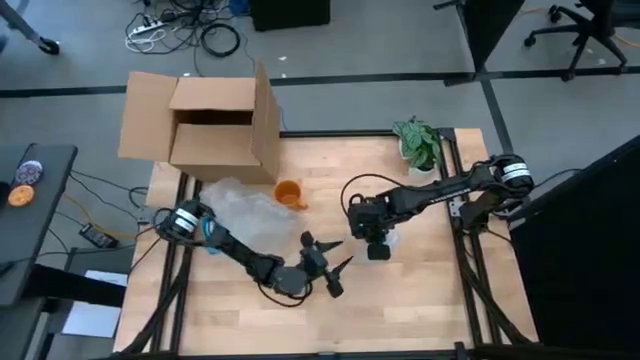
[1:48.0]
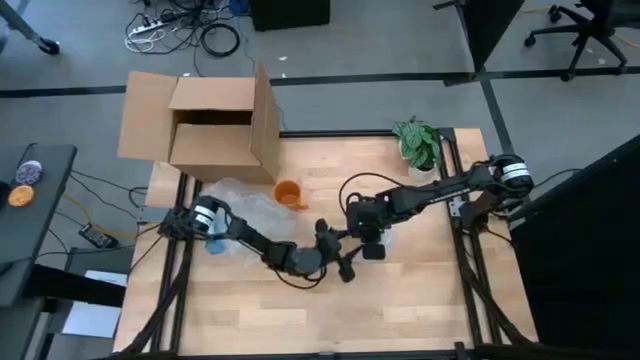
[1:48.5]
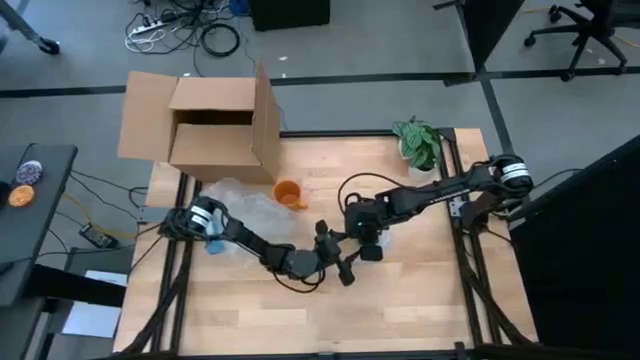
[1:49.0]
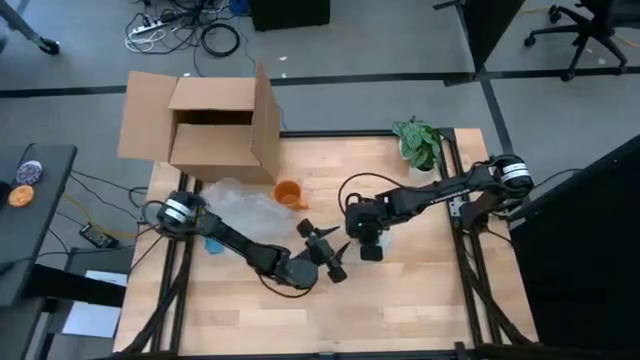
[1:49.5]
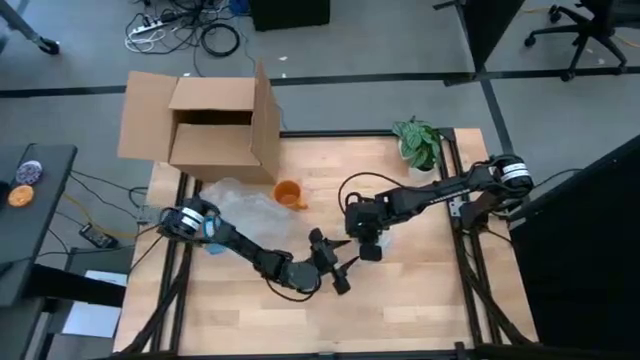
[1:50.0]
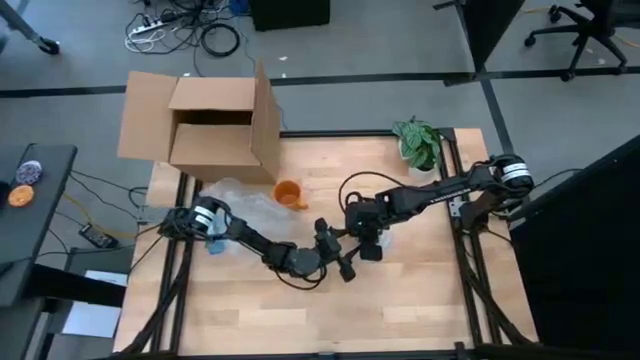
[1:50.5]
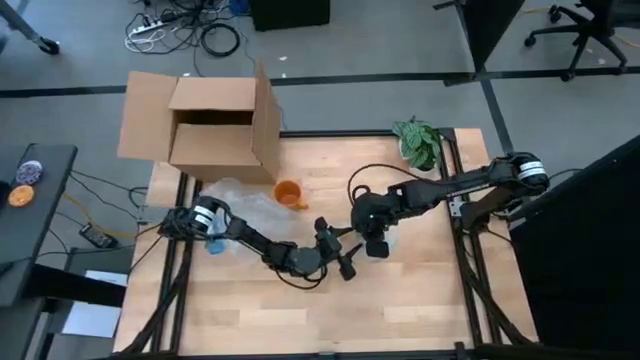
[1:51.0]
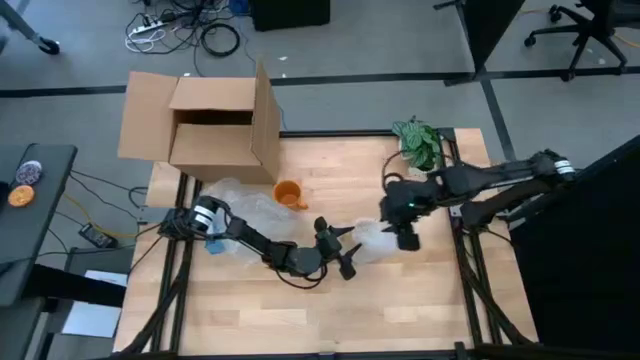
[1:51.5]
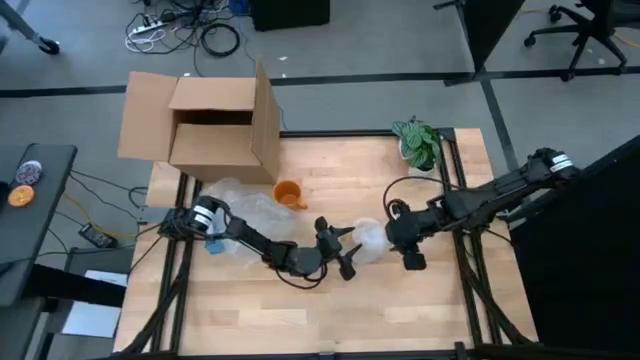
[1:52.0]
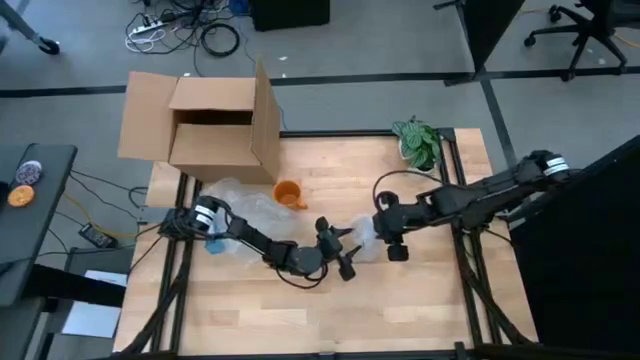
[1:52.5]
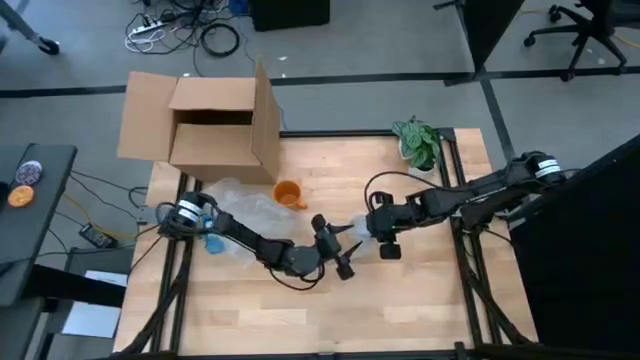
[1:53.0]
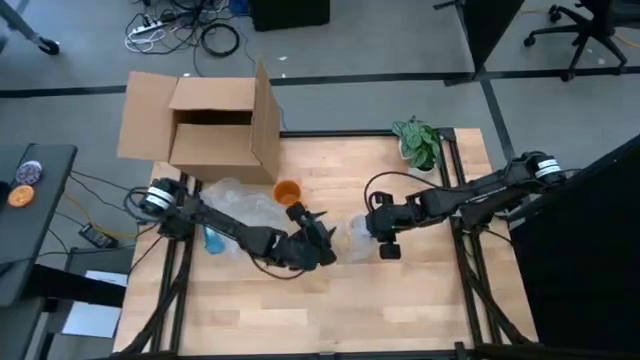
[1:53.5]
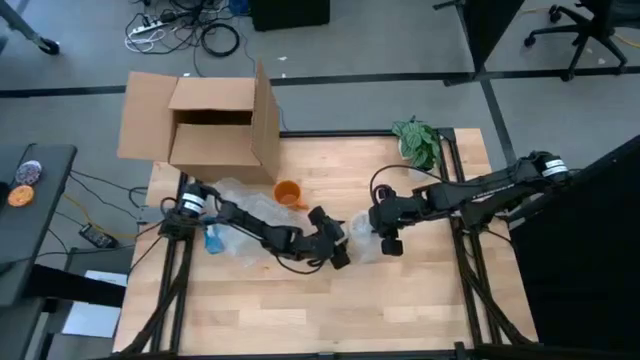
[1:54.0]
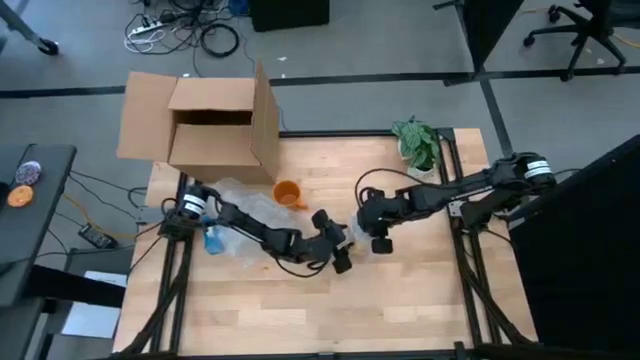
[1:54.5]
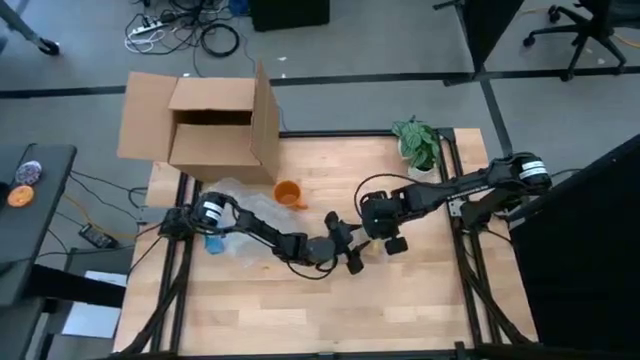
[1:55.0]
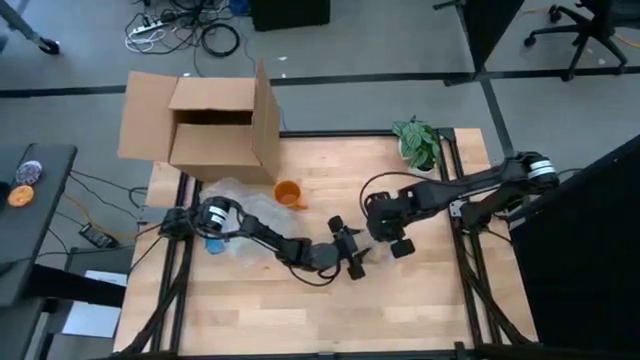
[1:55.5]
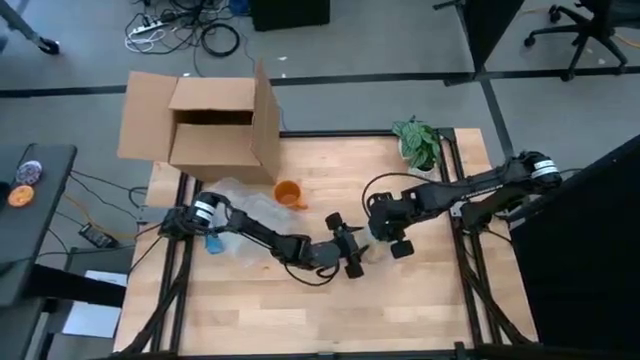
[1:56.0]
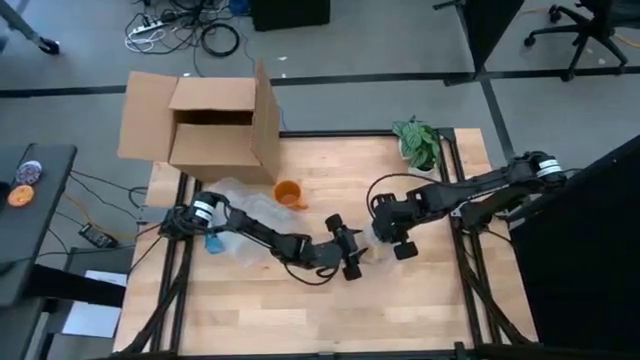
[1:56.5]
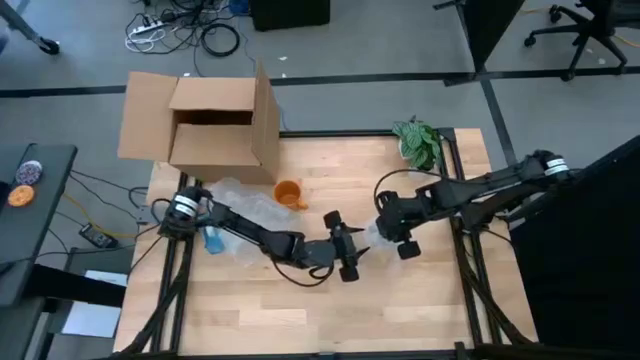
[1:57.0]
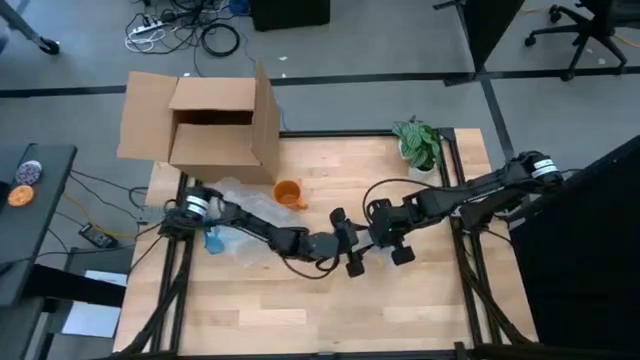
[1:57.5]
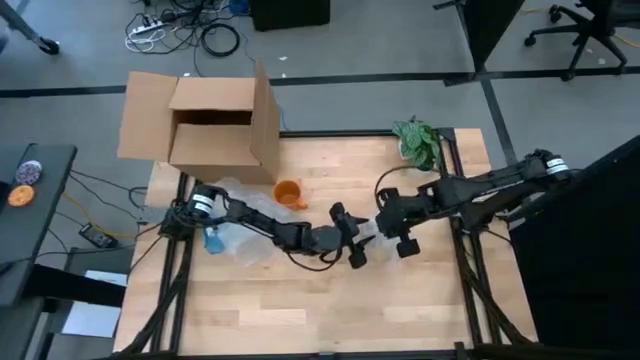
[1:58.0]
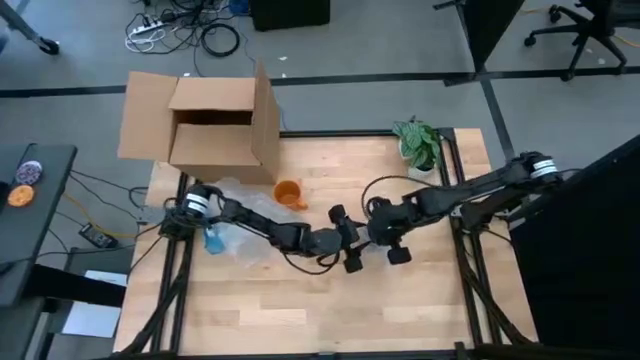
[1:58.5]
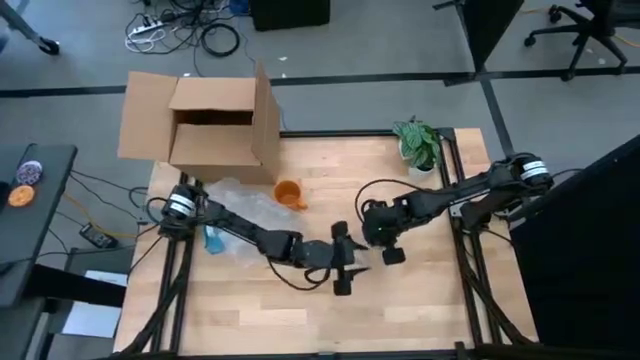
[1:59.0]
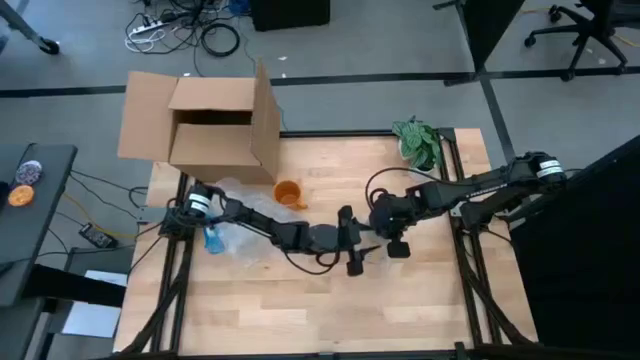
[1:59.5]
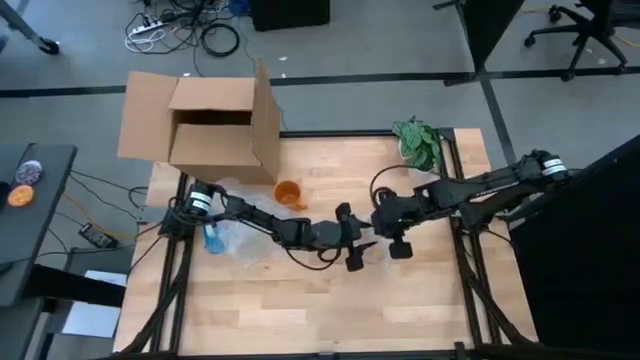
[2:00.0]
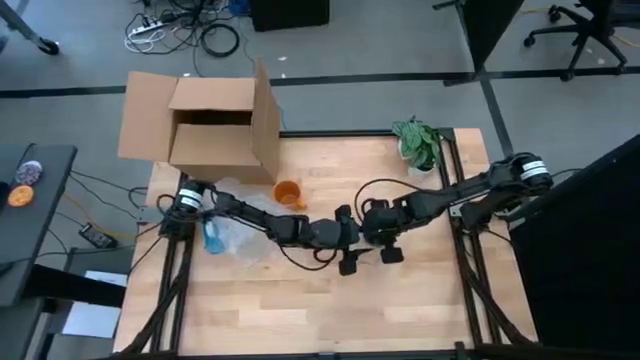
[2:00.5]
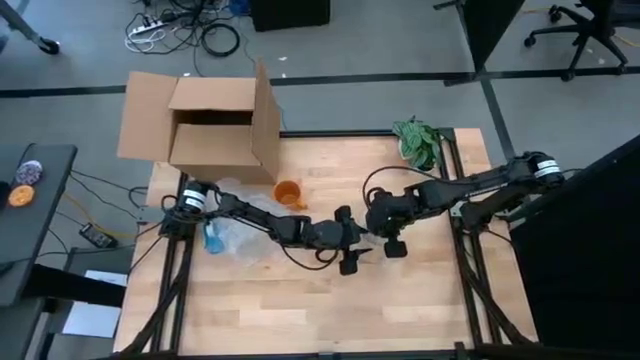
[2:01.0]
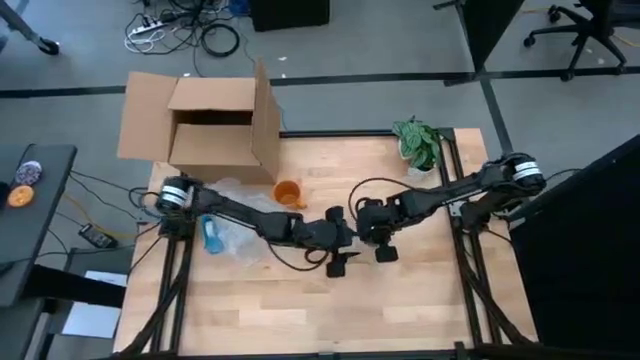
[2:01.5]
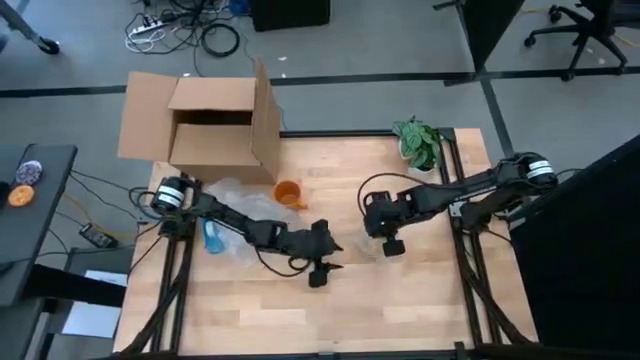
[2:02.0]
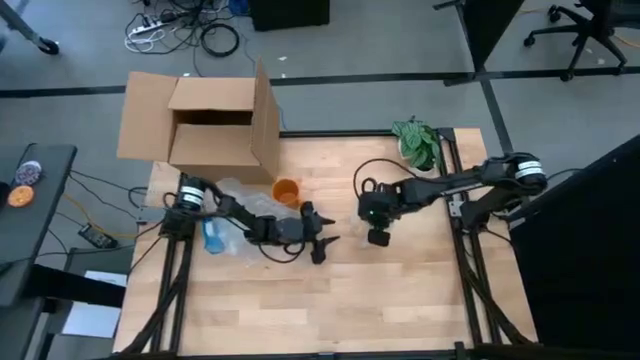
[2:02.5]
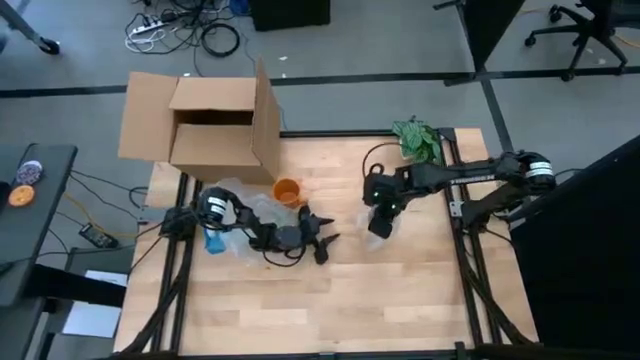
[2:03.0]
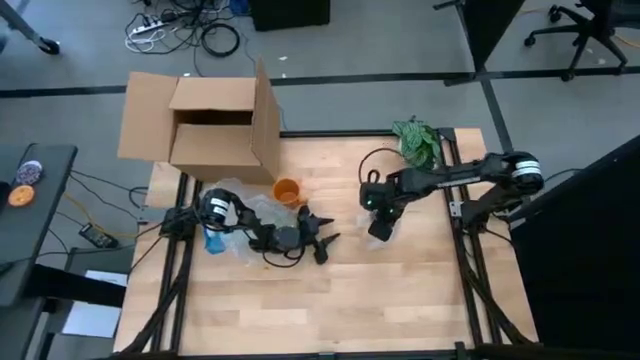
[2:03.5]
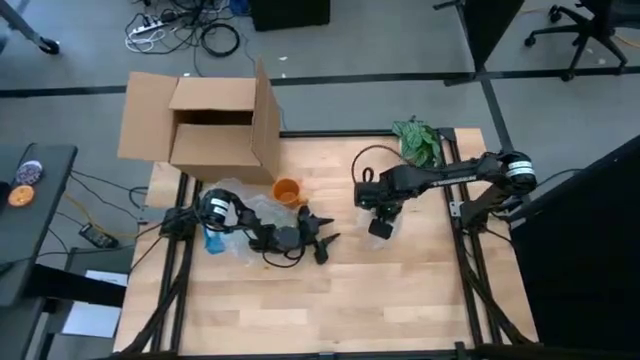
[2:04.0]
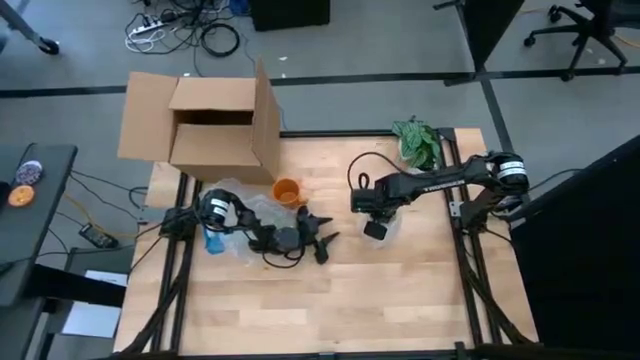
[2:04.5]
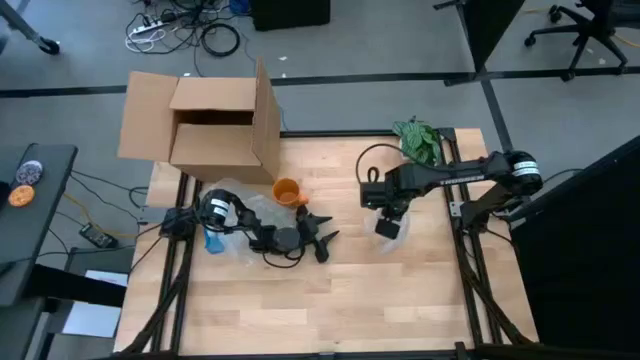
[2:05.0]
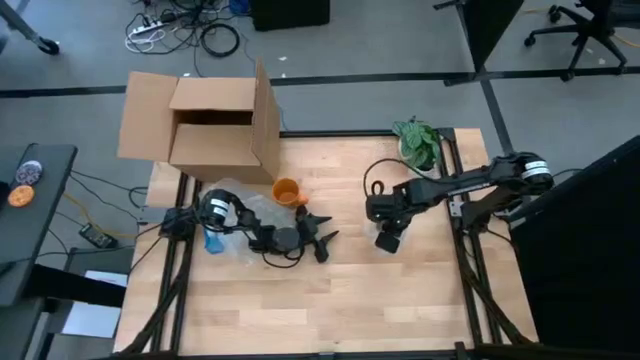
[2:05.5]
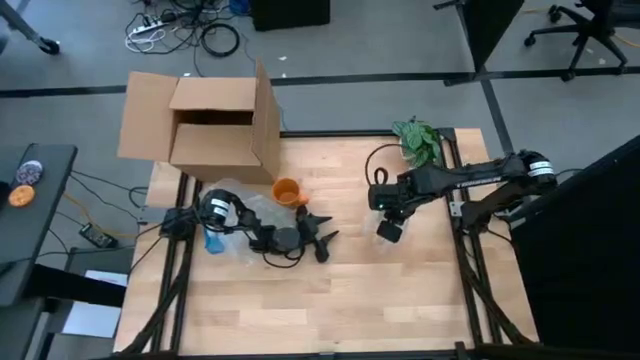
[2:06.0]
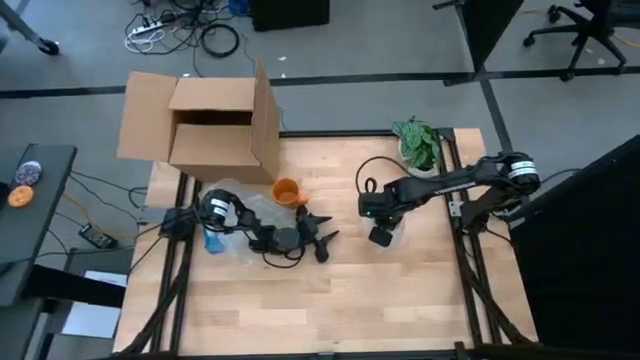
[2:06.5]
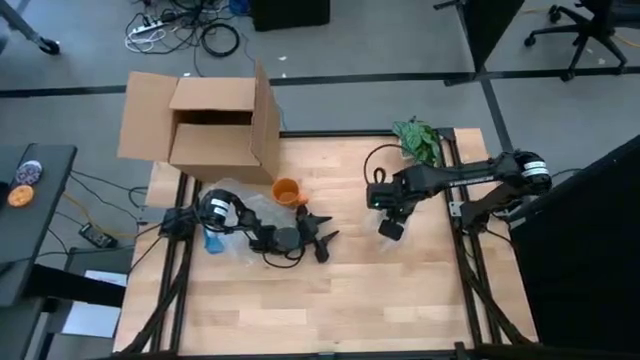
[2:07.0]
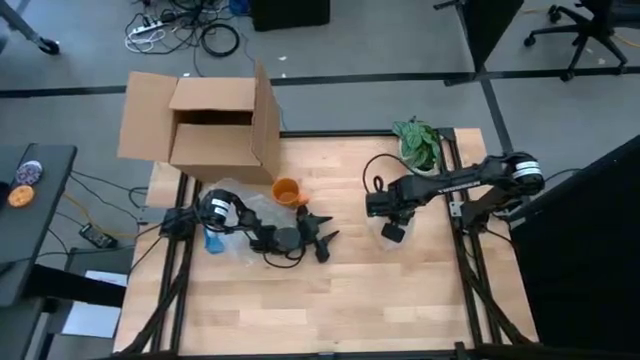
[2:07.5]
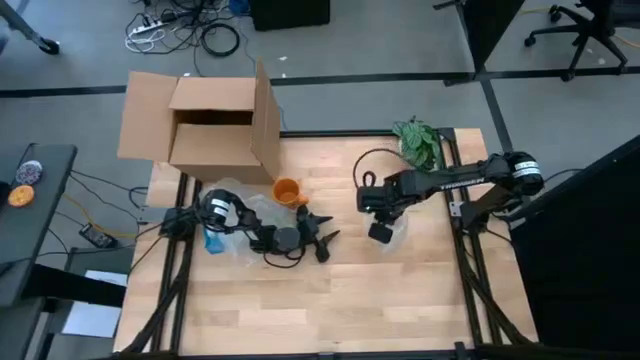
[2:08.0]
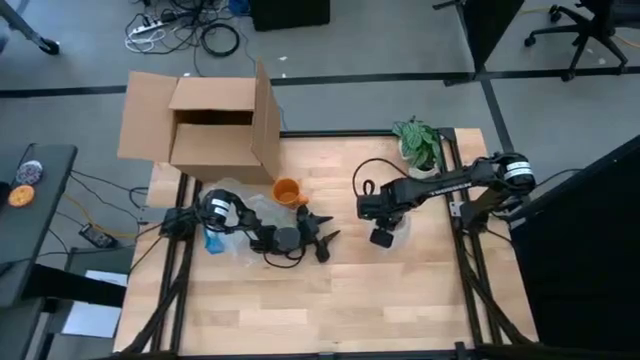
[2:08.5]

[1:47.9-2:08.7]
Task: wrap mug
Wrap the yellow mug using the transparent bubble wrap
